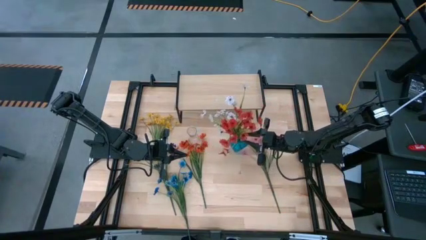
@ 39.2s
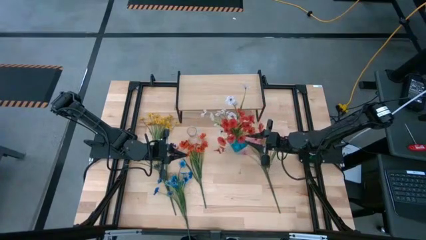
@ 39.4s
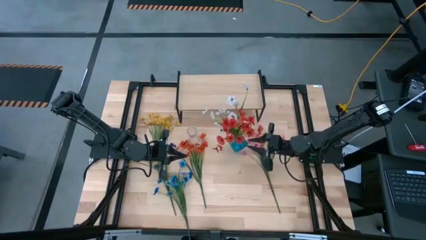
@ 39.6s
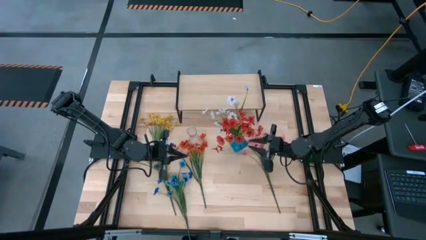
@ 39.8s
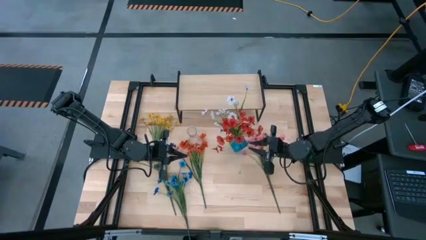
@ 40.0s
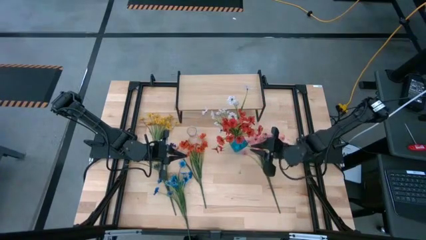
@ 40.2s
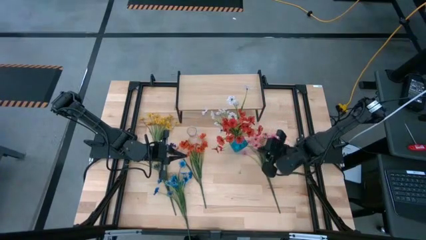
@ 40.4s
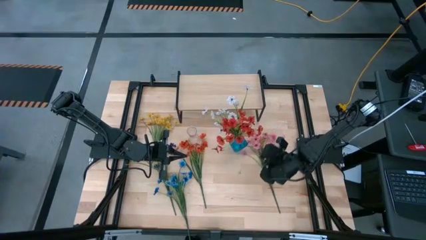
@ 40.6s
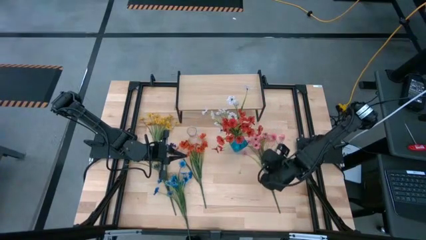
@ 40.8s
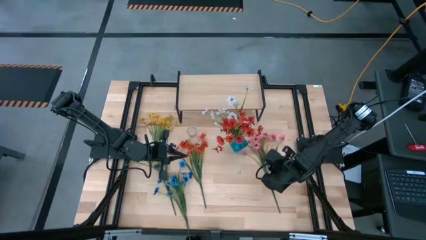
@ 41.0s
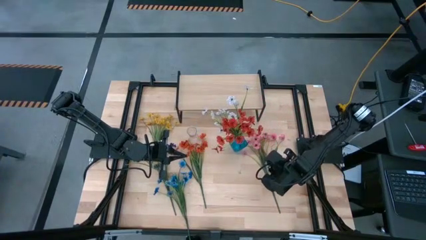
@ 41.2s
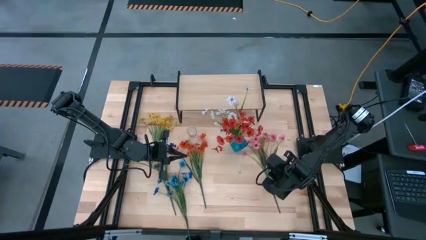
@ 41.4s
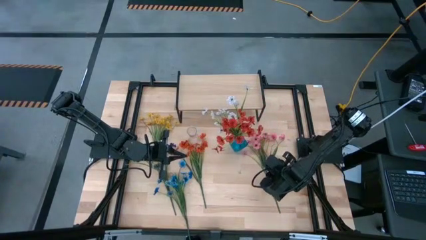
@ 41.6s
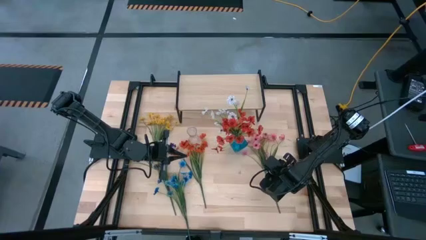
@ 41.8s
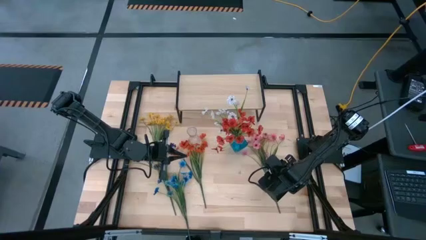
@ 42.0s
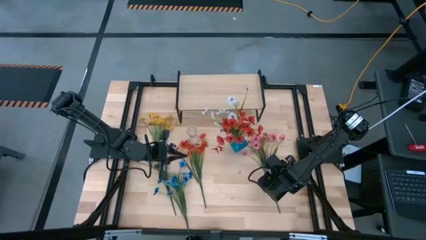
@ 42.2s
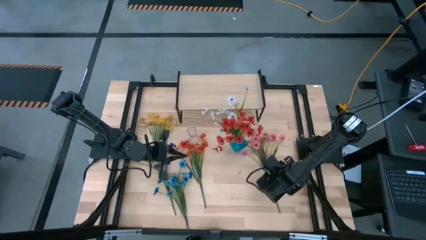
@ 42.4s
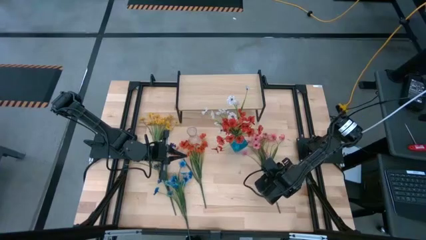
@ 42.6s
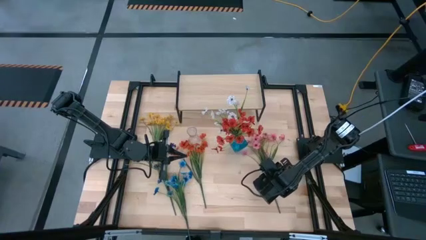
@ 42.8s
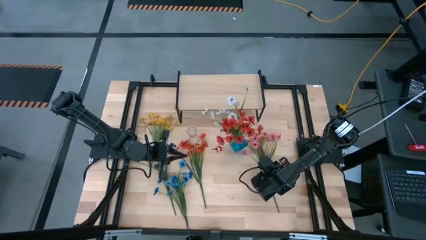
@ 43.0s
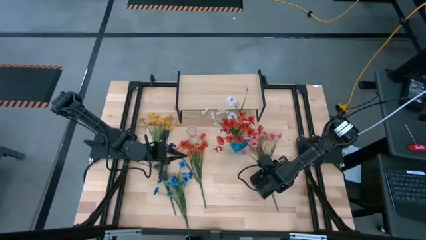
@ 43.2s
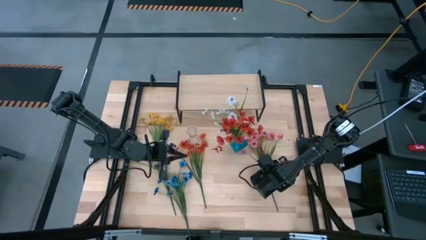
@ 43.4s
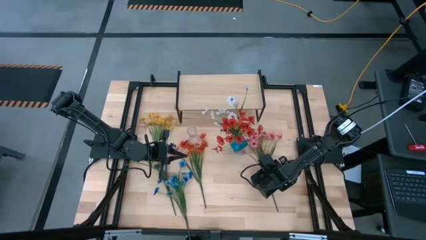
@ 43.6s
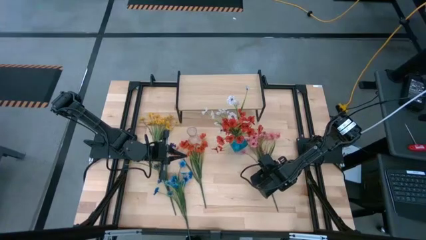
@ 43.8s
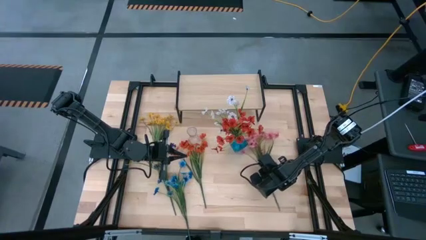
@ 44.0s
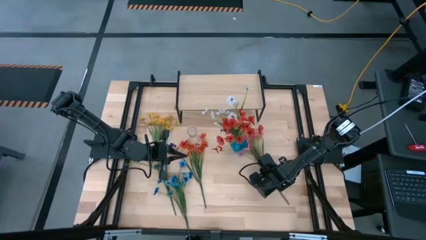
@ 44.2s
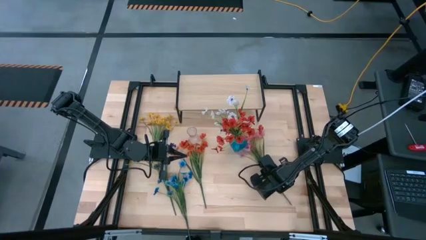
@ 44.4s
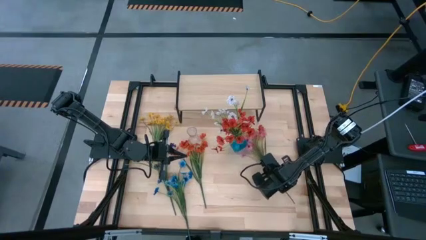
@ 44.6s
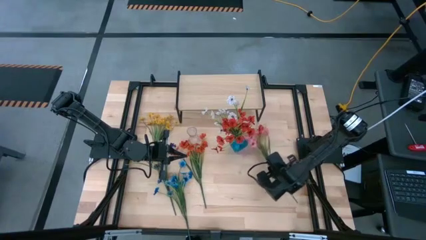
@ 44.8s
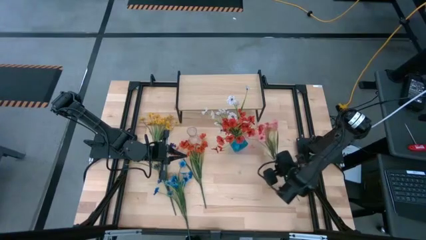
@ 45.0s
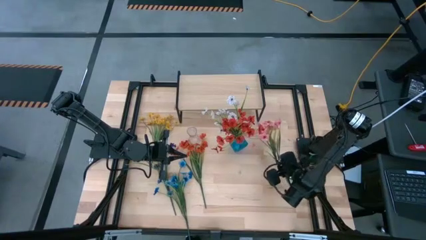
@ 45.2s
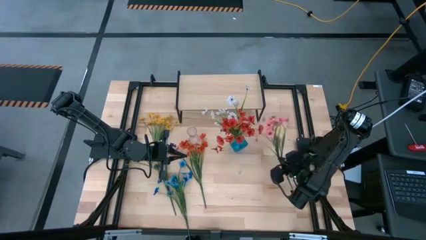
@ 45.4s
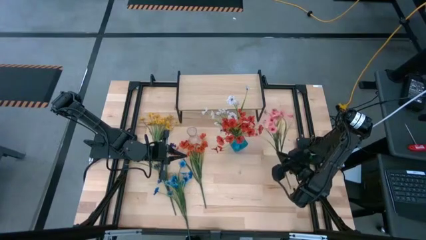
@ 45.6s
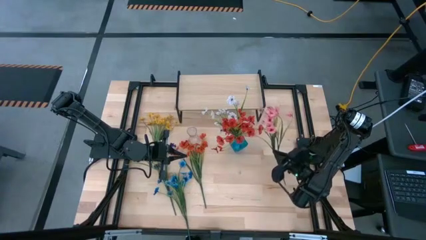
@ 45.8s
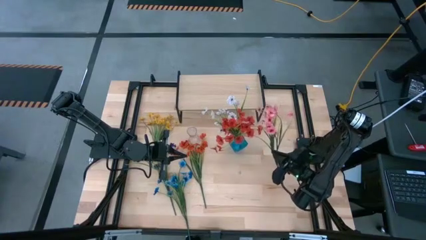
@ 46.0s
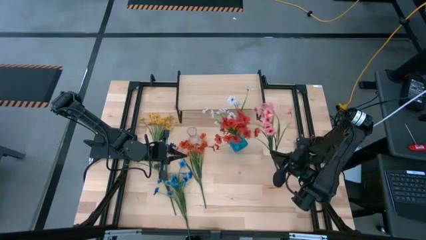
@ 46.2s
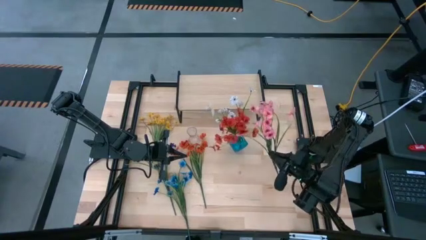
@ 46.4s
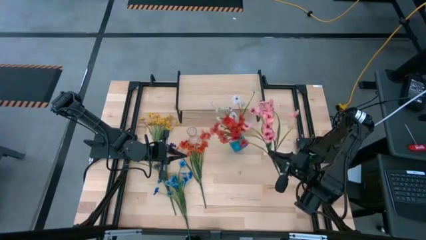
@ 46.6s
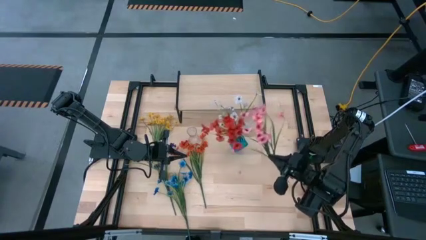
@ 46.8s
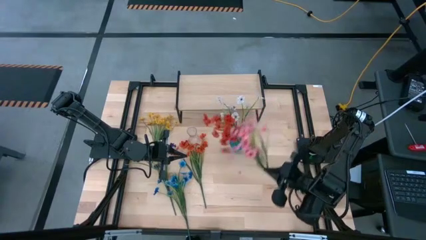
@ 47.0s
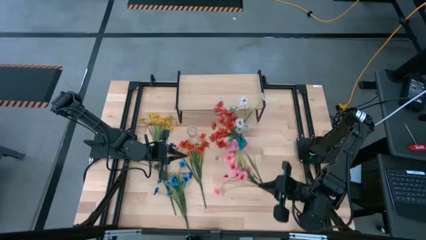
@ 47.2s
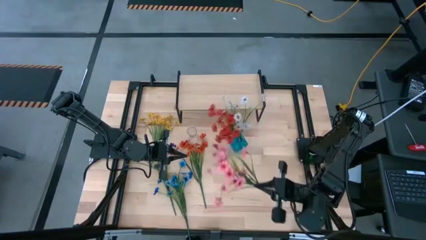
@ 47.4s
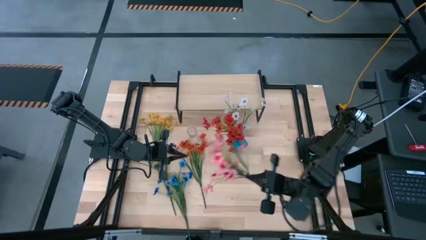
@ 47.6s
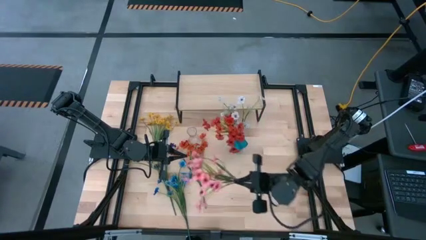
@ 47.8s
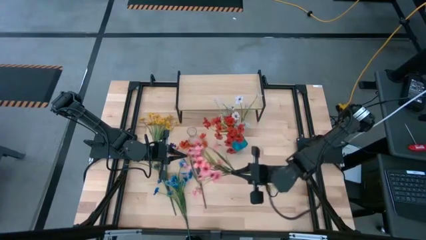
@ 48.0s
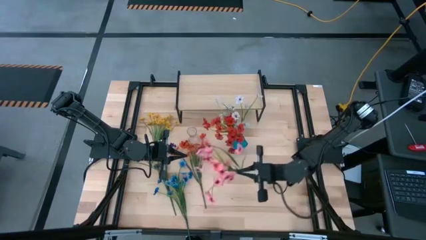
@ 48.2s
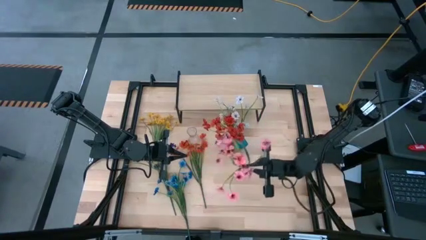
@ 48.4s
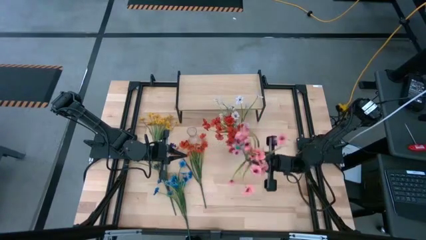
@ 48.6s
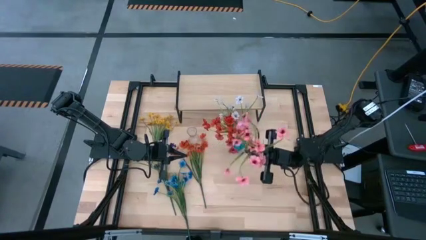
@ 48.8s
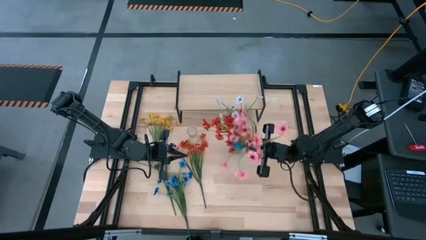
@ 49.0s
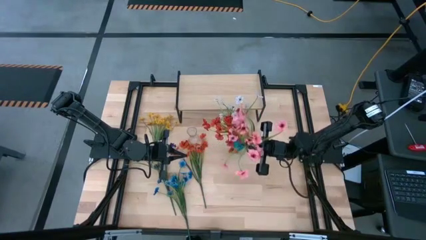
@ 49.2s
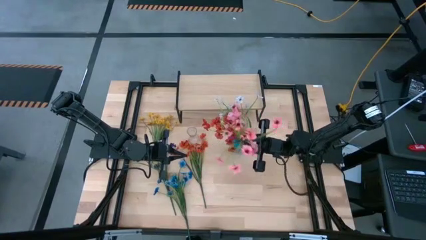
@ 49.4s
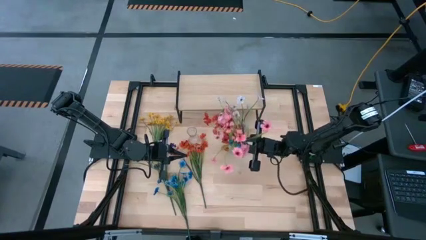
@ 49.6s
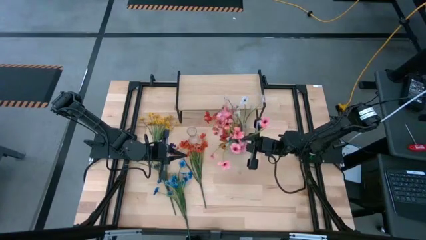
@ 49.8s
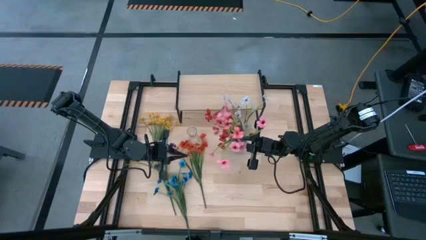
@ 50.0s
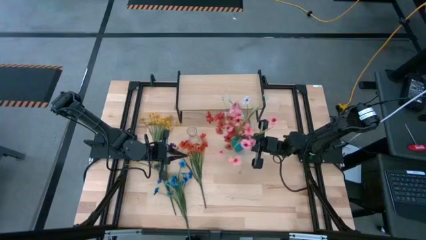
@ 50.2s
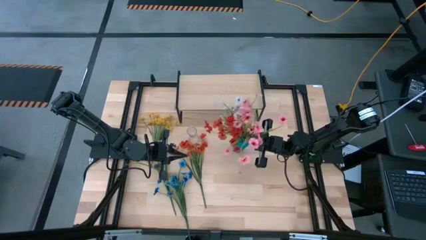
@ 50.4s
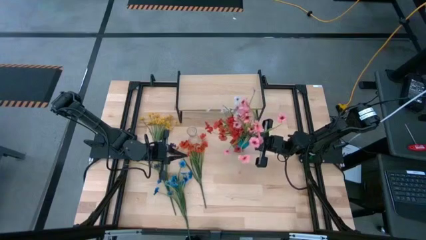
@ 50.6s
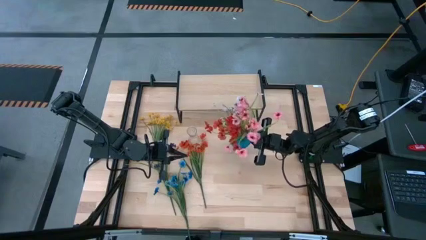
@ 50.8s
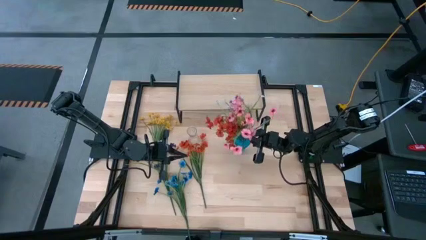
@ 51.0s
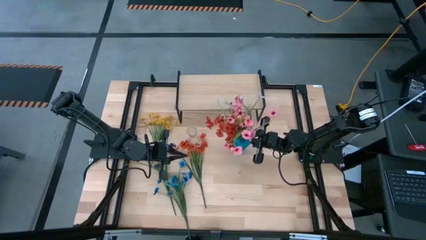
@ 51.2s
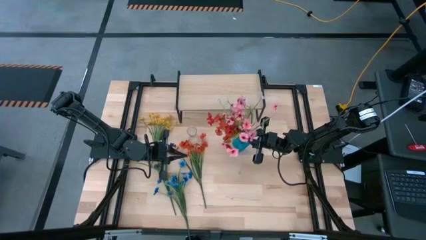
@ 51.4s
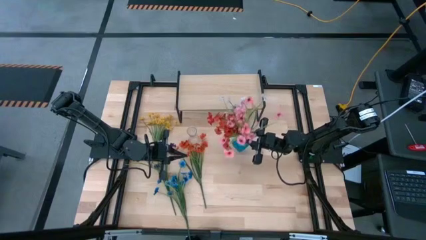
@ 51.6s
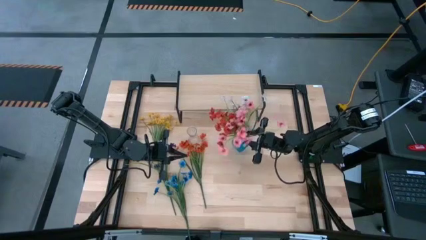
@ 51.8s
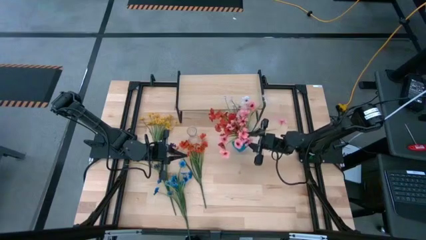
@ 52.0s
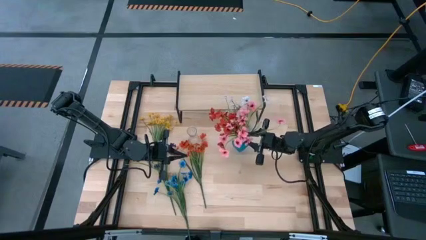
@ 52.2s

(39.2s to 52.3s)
Task: Pick and place flowers into a vace then onto a shelf
Put the pink flowers into the blue vase
